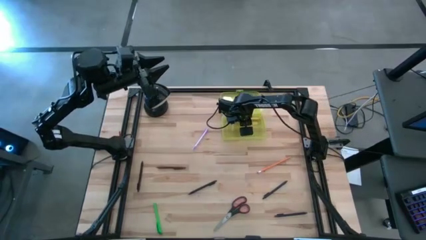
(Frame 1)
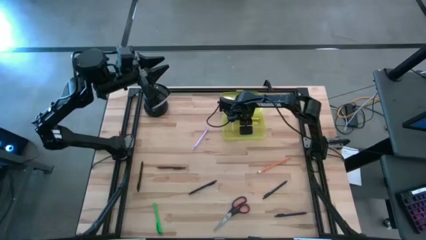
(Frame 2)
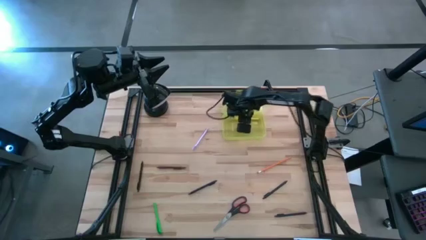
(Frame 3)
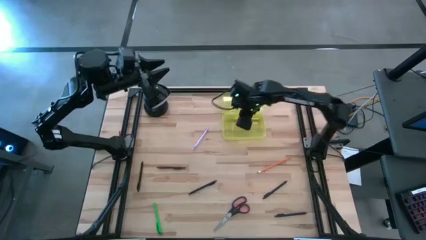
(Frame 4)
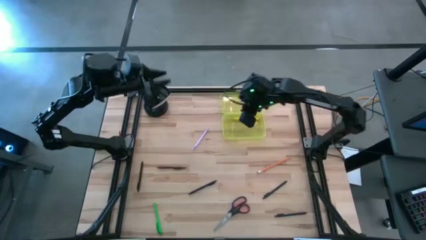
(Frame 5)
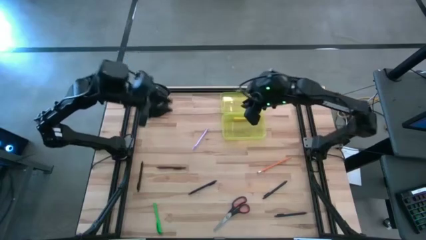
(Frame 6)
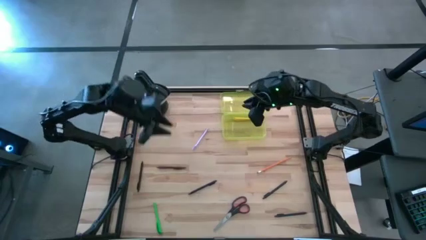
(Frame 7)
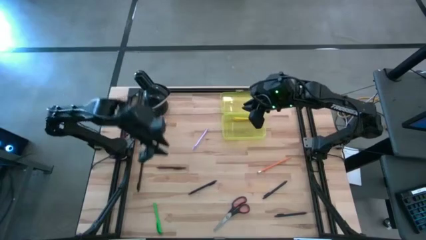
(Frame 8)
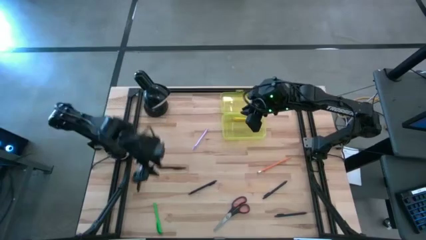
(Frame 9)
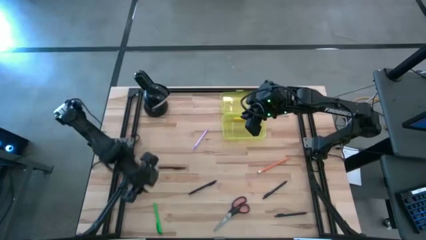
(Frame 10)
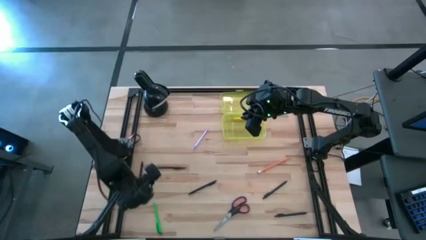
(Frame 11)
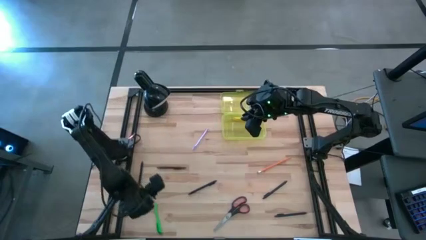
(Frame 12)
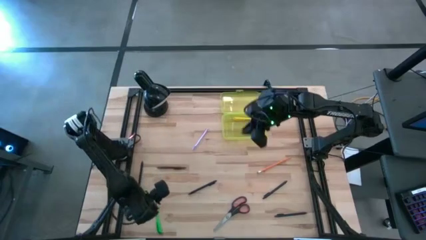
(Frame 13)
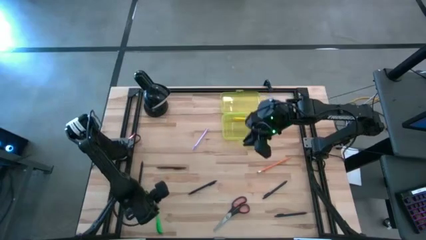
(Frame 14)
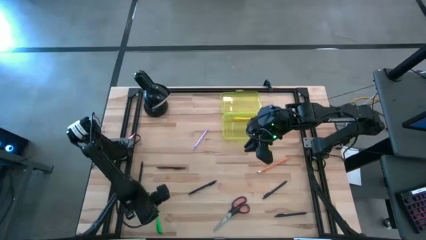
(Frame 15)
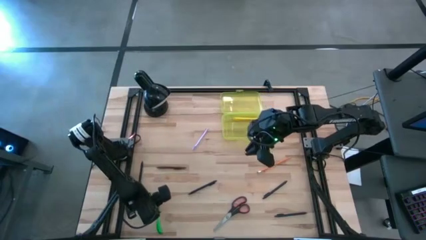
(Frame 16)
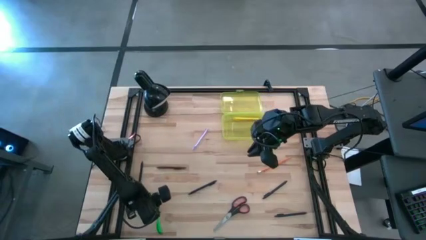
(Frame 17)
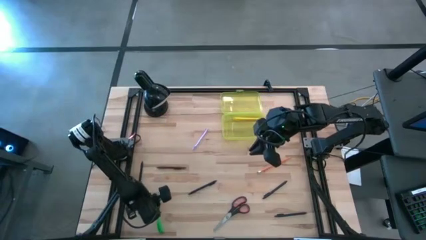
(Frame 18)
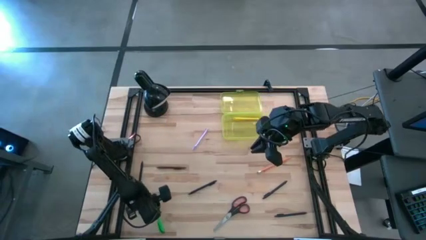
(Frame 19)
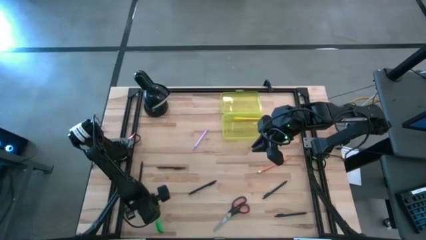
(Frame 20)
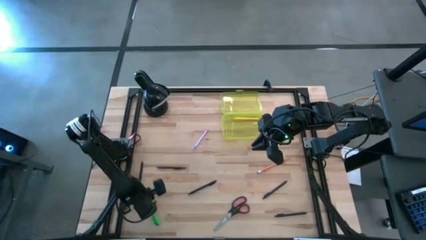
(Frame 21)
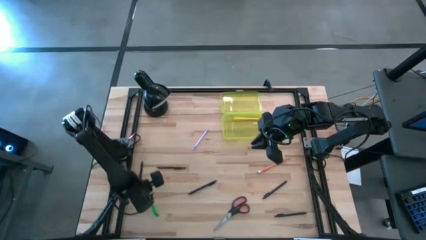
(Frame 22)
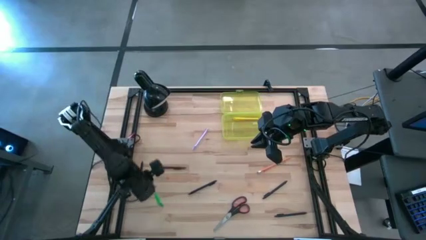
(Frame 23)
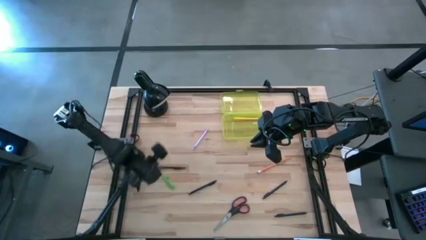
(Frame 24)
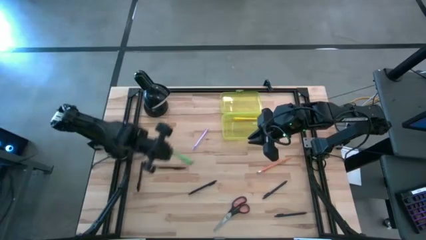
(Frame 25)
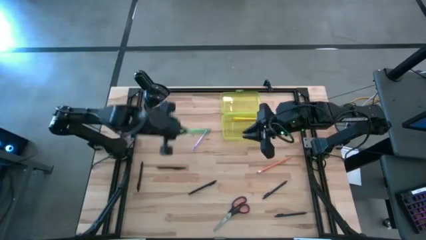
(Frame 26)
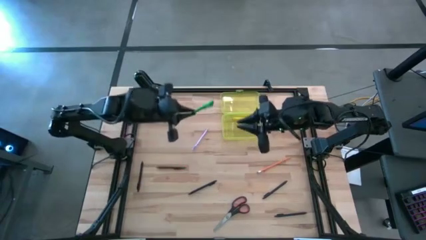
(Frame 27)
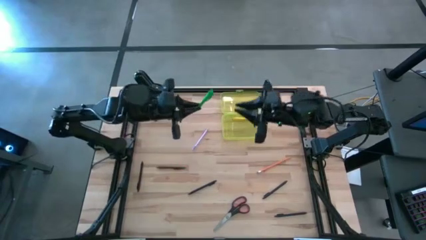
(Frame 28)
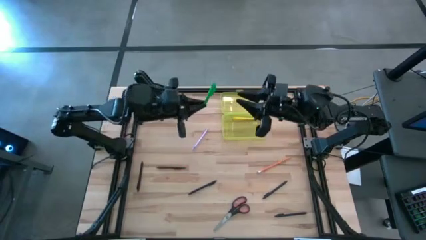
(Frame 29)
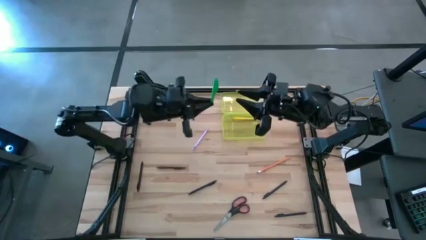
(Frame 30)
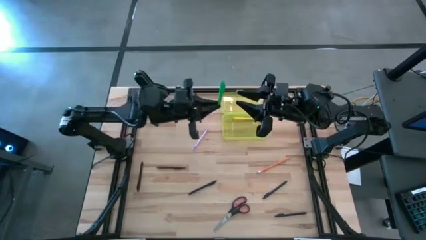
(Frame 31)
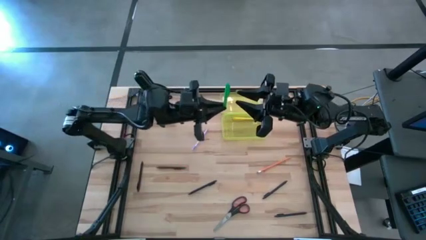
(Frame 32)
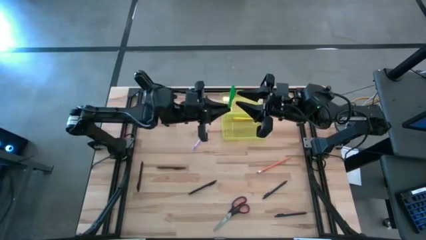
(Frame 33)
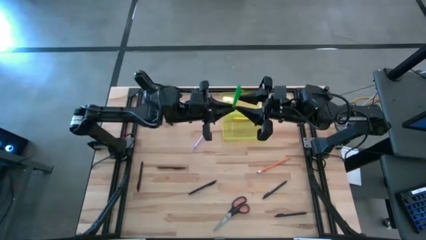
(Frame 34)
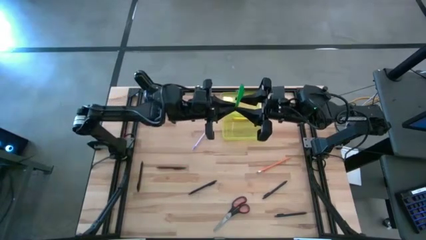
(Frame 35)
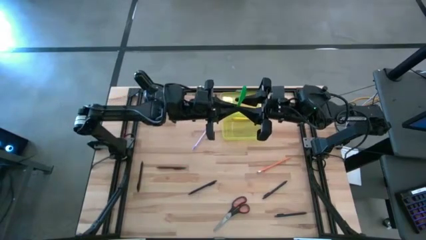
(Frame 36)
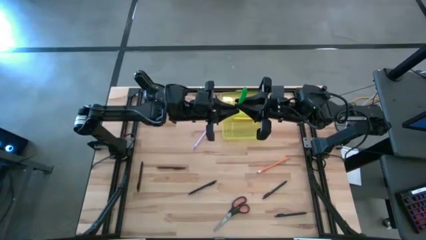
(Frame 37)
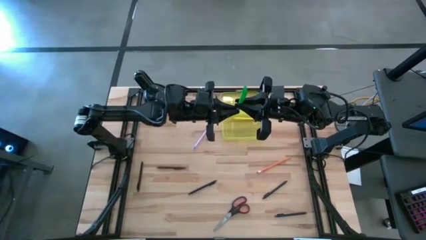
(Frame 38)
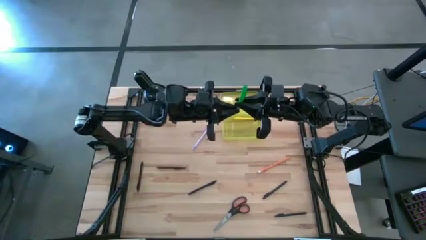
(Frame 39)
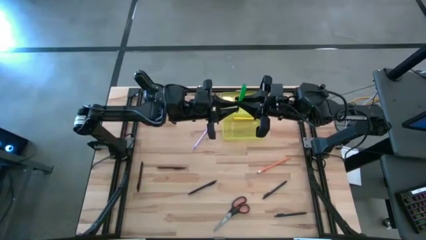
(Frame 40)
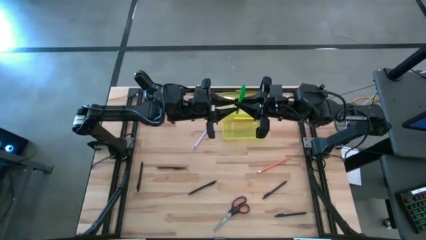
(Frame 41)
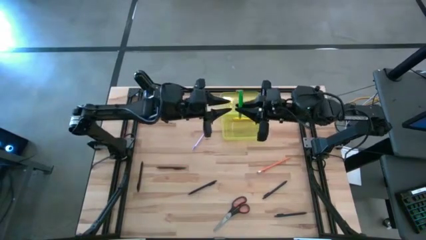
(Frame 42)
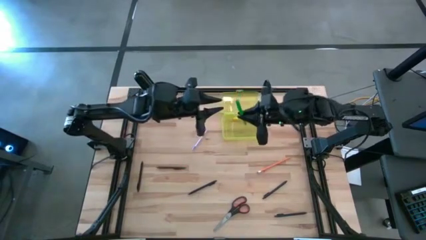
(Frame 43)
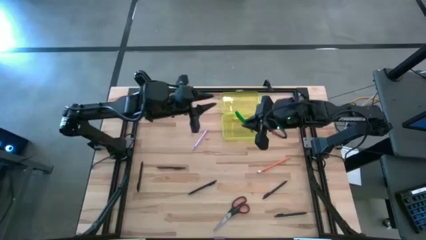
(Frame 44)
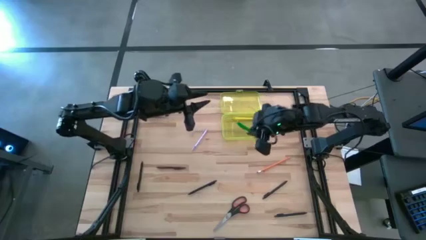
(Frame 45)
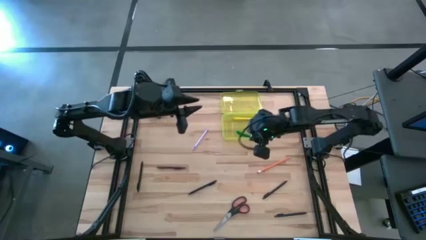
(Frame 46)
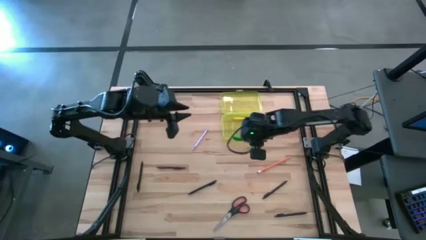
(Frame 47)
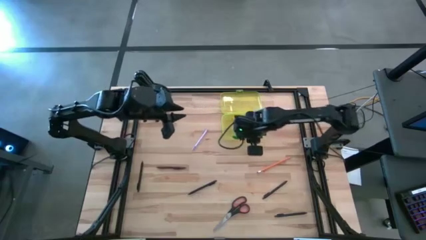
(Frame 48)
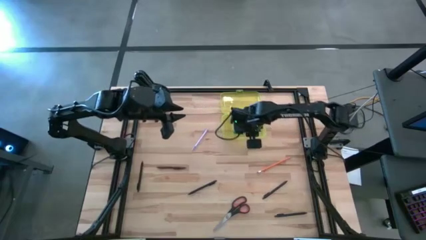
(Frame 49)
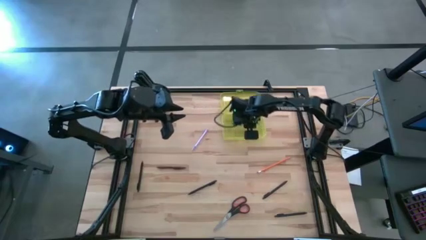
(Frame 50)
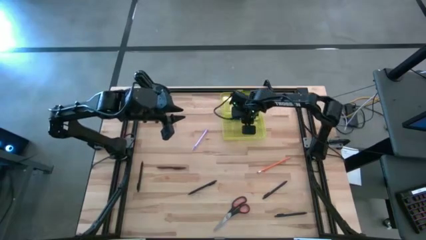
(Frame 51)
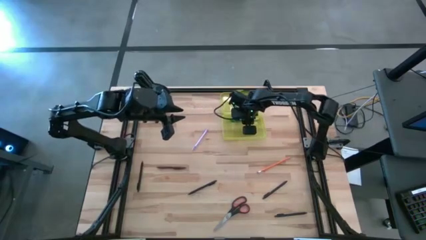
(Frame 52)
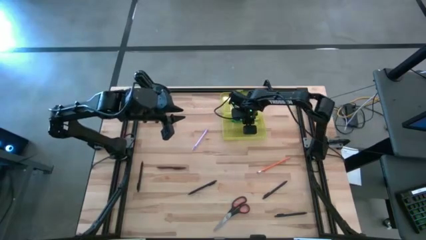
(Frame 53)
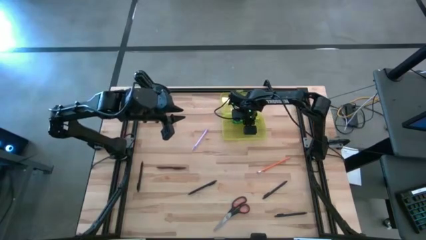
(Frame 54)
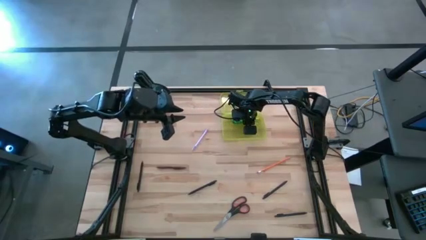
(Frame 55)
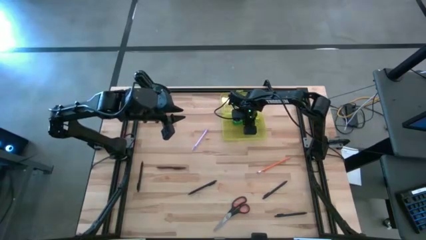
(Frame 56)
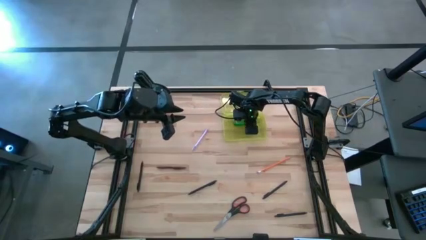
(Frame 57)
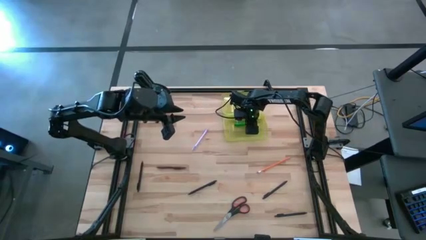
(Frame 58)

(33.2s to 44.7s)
Task: Pick & place school supplies into a supply box
Put the green pen into the supply box

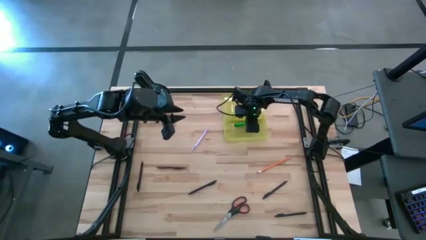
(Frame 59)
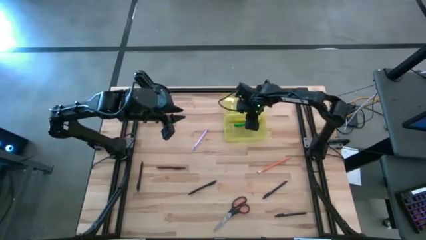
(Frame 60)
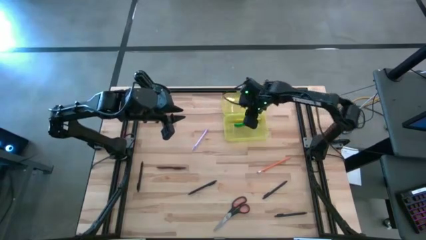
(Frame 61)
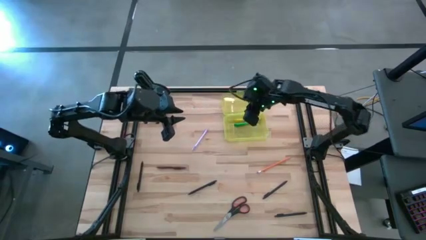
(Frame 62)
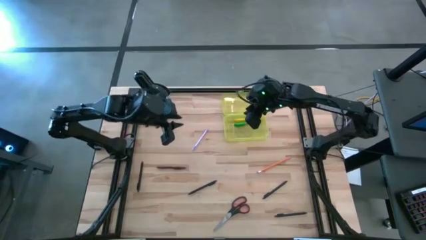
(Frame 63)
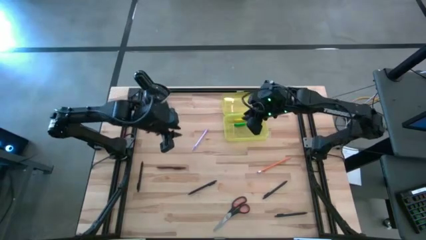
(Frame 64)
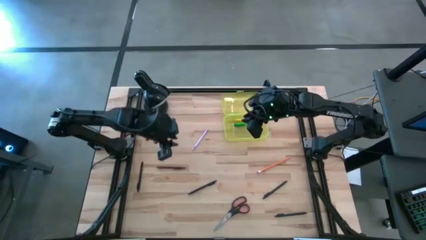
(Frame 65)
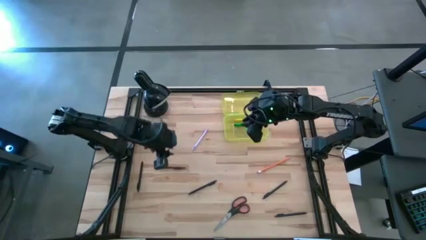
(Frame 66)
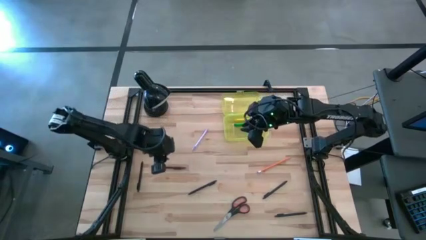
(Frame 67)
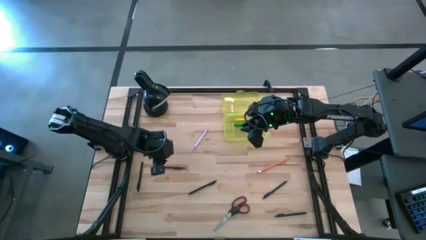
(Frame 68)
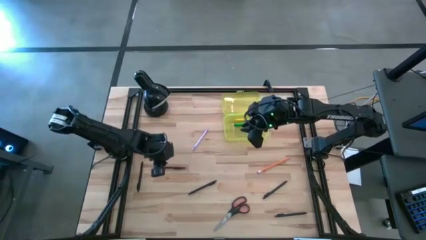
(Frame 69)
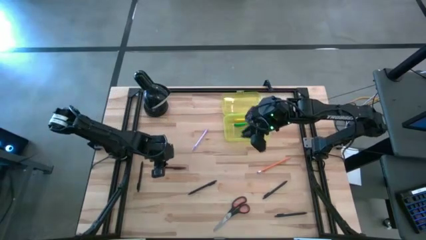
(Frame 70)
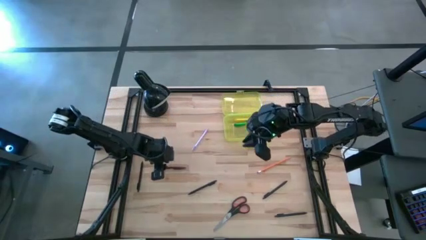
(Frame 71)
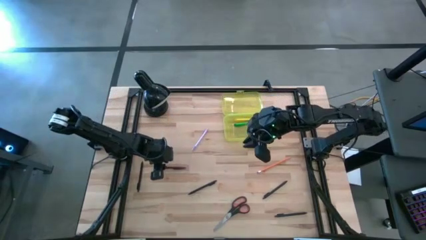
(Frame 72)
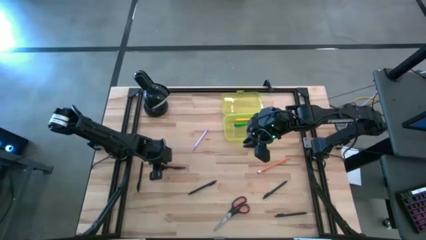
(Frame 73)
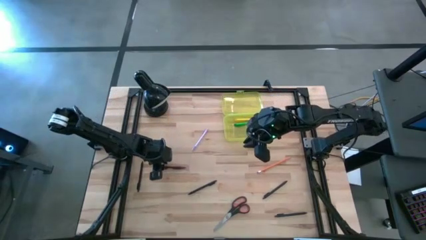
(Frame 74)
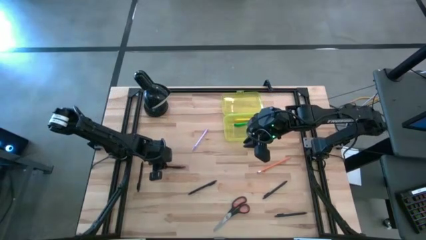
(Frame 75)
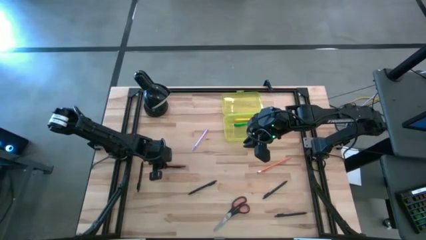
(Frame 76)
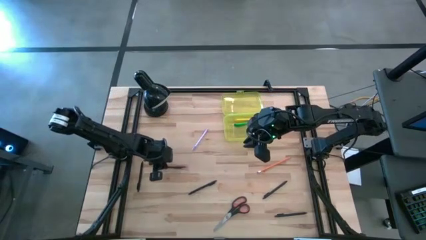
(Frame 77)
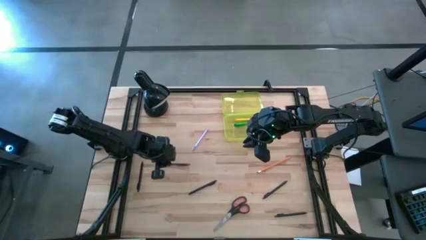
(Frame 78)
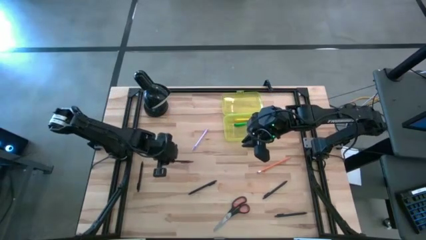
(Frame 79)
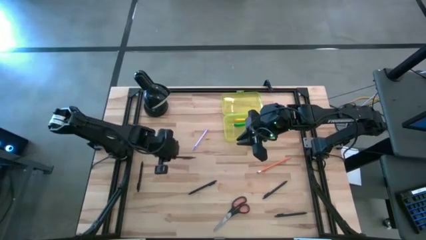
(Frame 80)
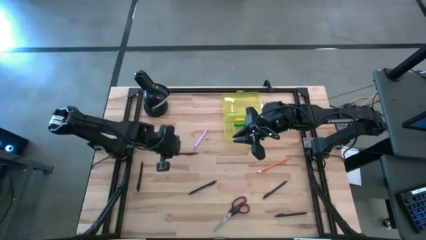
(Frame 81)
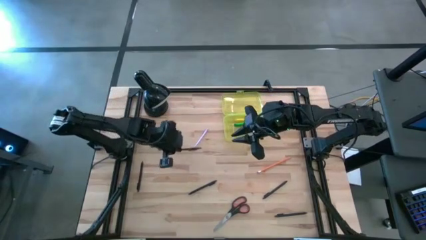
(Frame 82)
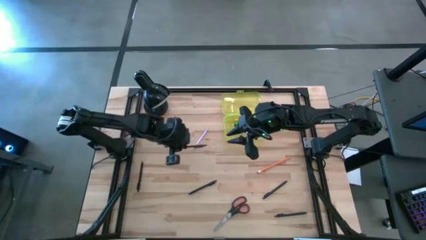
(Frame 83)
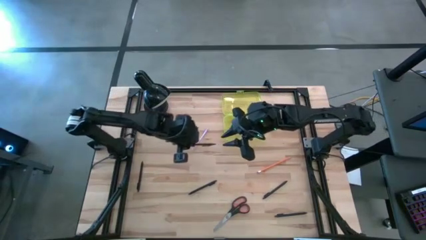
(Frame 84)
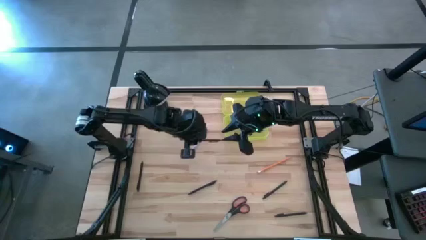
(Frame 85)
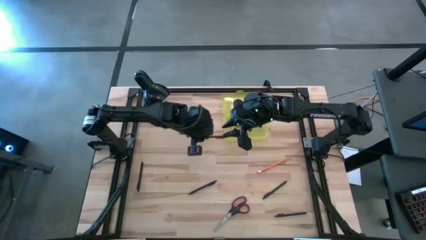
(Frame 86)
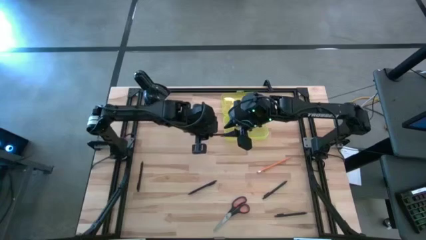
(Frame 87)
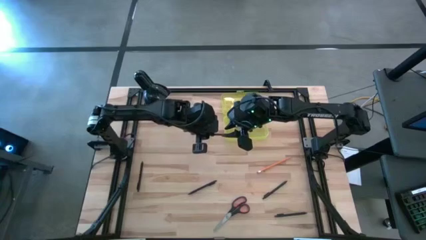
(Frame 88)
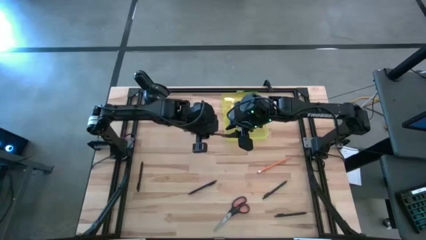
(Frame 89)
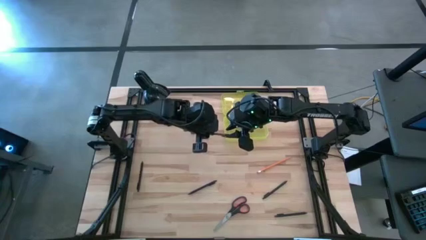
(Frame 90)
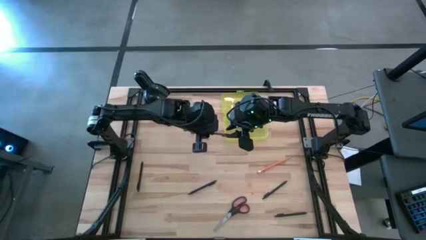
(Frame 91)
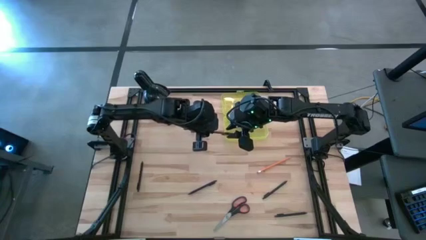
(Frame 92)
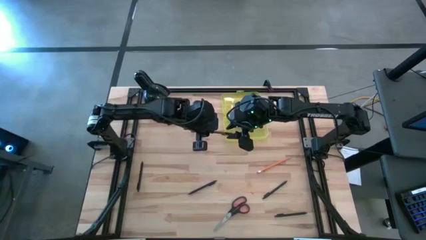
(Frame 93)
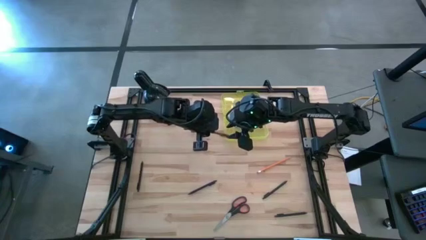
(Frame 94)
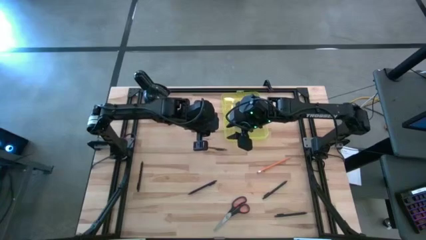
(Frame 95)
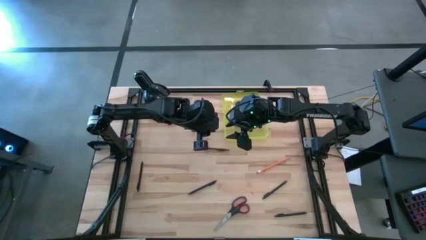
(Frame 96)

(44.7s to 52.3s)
Put the brown pen into the supply box
